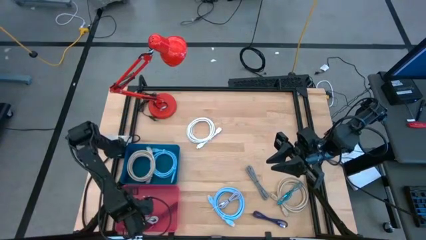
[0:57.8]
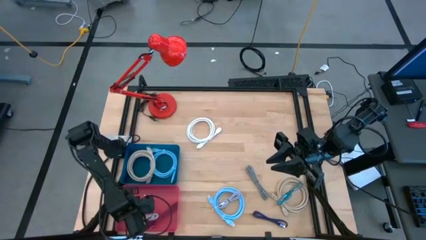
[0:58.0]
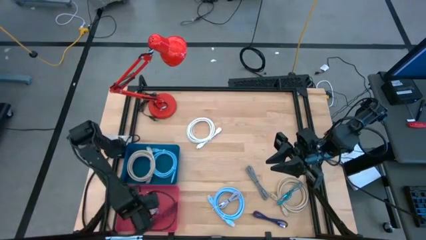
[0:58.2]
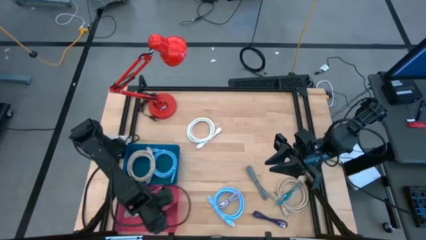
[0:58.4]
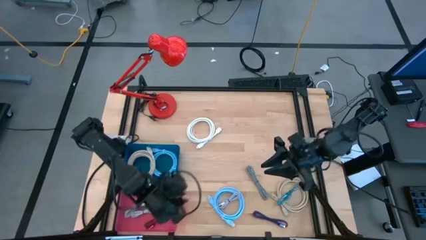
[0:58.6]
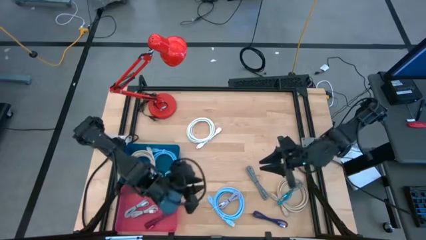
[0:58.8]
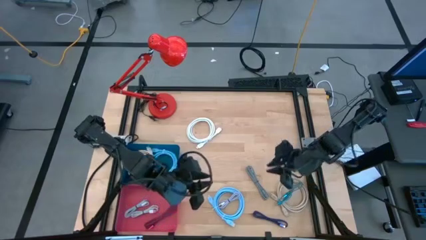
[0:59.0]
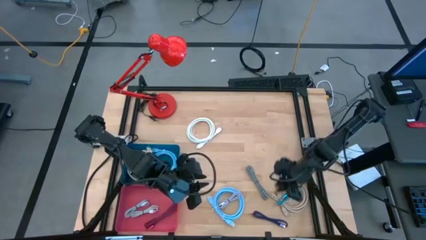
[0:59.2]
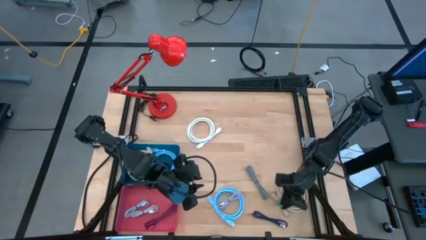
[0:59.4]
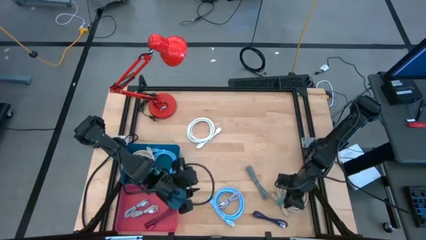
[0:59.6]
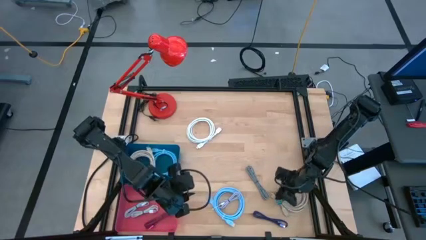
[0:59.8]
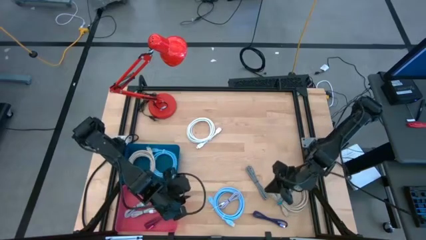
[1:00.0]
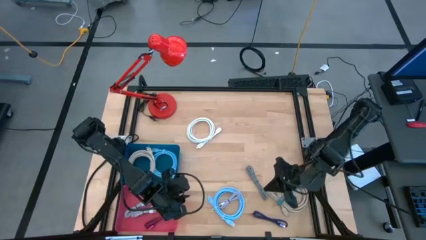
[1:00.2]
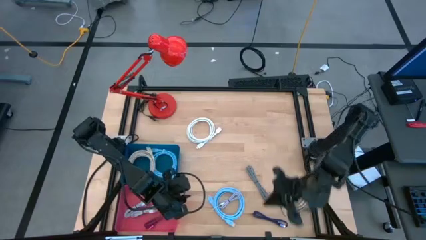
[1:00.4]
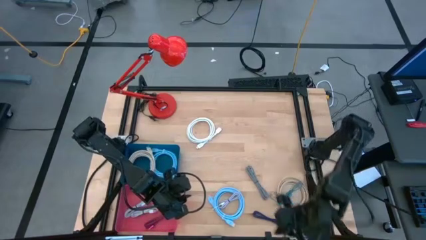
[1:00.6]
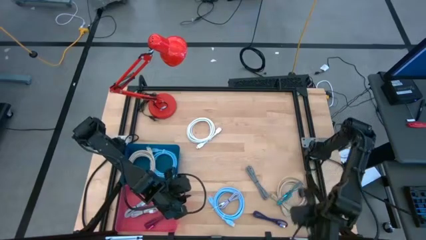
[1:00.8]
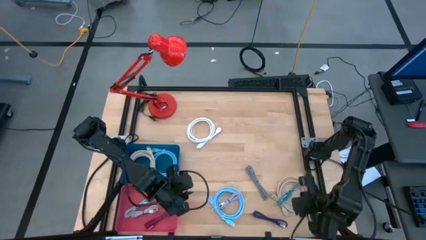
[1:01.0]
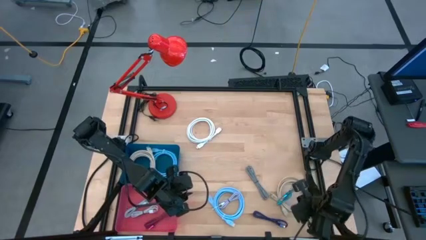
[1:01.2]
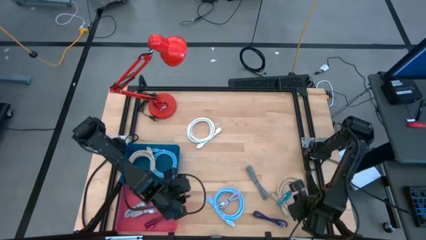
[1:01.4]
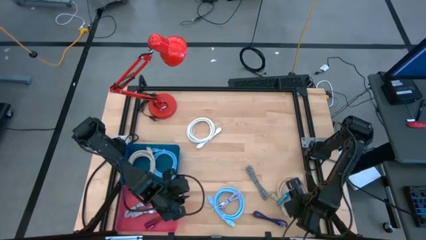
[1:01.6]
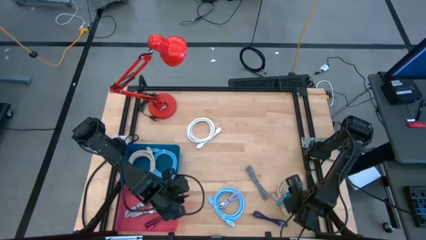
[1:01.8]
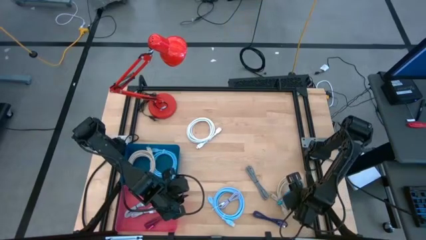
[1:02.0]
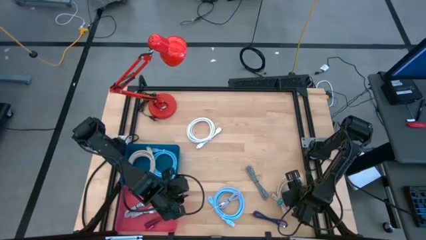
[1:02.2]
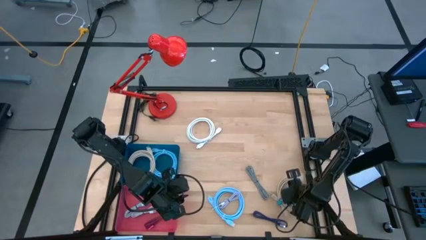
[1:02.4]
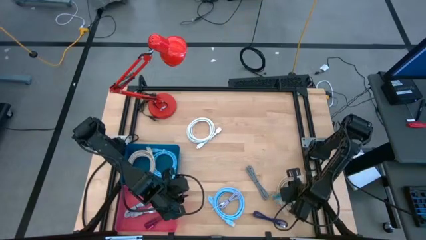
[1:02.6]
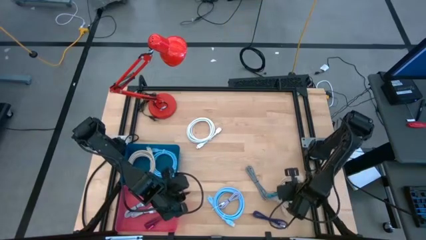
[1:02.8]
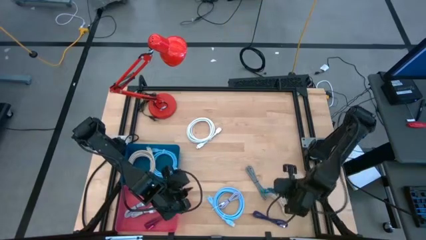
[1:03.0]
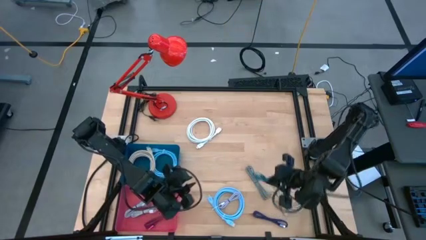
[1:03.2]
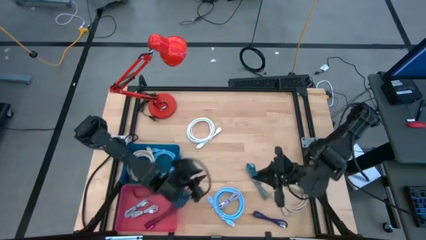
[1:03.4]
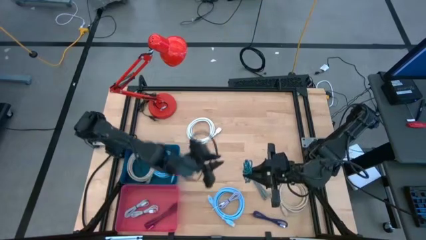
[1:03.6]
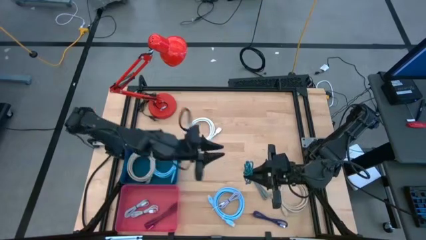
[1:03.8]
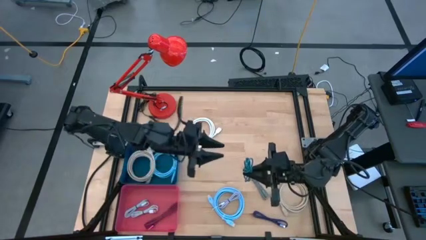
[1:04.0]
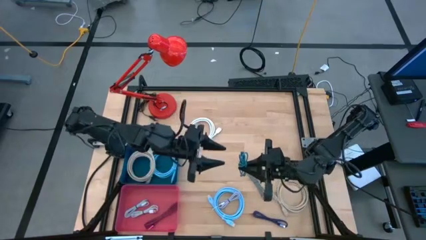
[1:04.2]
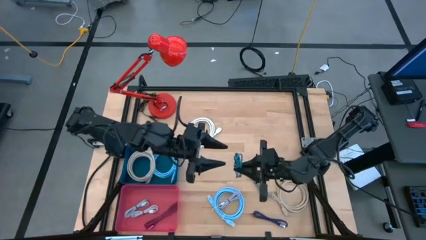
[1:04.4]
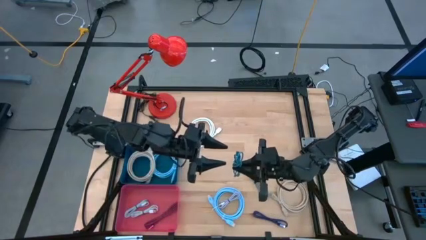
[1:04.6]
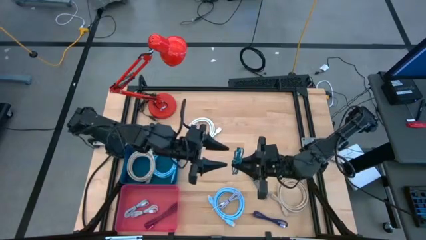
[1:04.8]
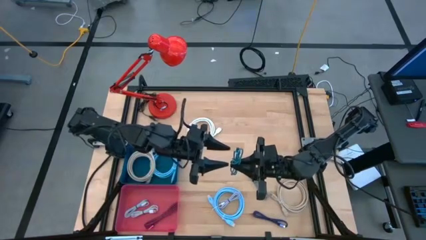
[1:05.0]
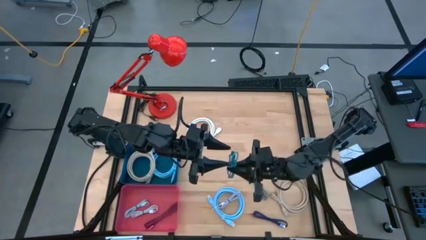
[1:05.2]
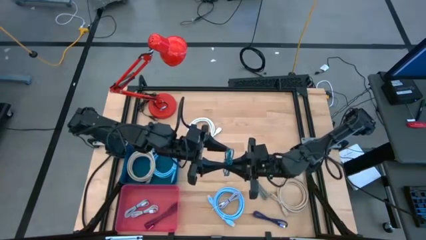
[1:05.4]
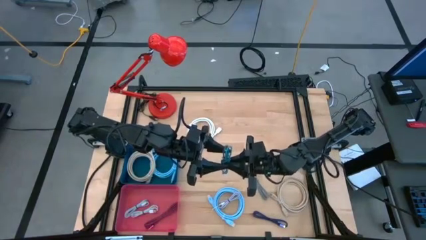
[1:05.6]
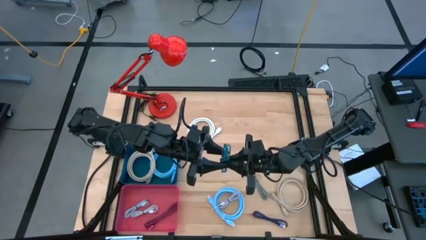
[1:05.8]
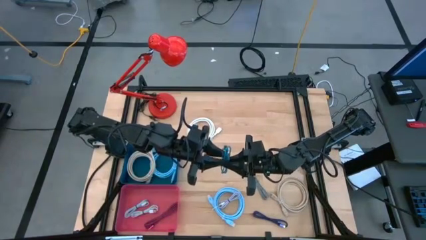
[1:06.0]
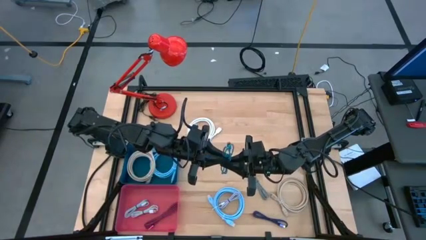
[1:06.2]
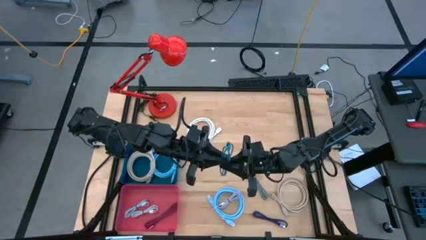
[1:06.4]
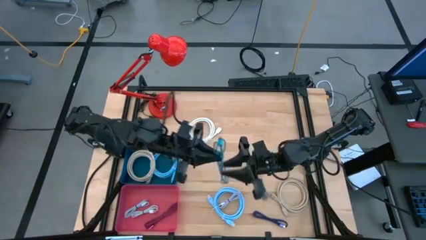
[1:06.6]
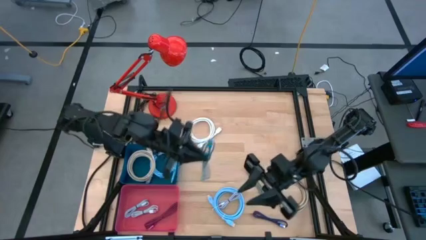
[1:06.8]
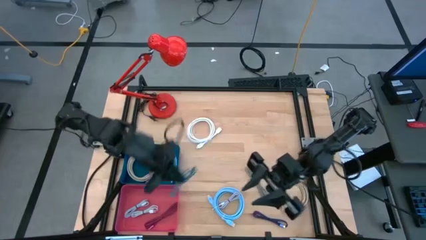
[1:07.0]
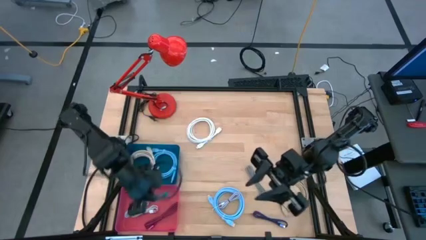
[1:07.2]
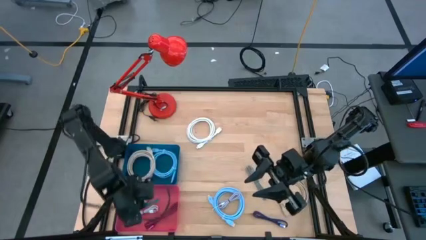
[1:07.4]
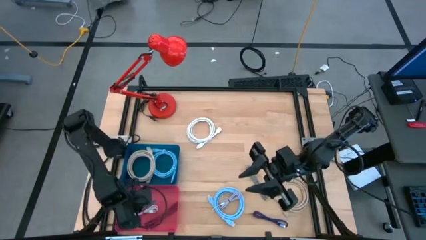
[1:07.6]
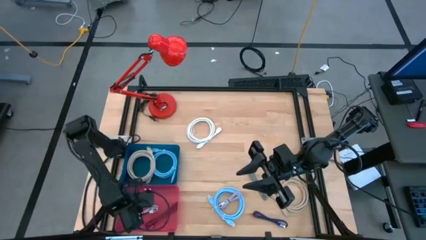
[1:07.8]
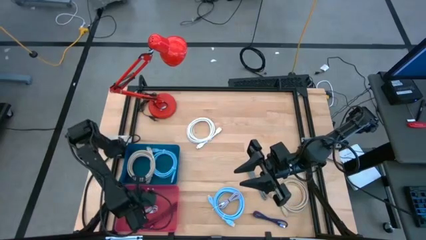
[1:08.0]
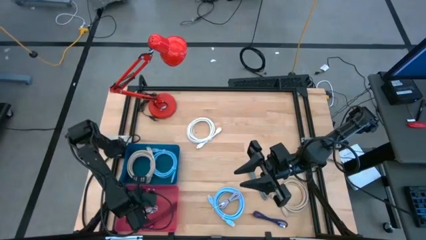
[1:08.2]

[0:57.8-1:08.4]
Task: Pick & Place USB Port
Put the blue and black USB cable into the red bin

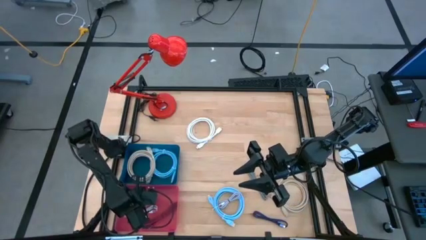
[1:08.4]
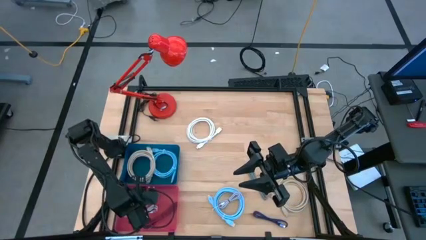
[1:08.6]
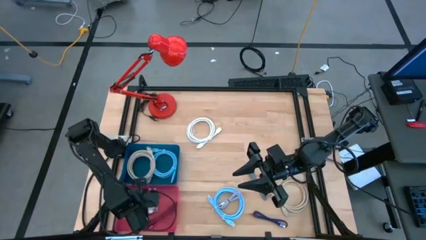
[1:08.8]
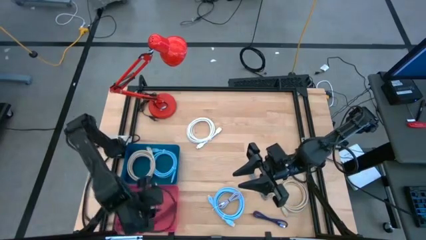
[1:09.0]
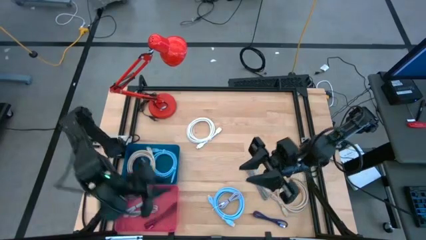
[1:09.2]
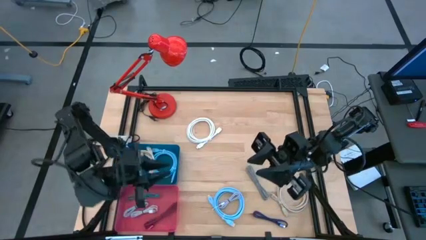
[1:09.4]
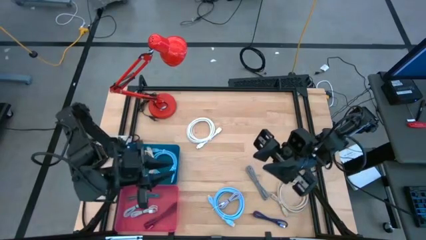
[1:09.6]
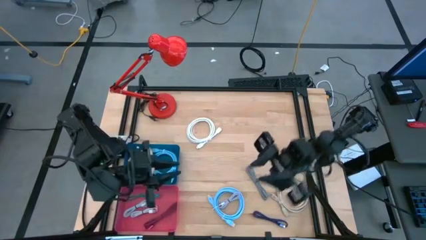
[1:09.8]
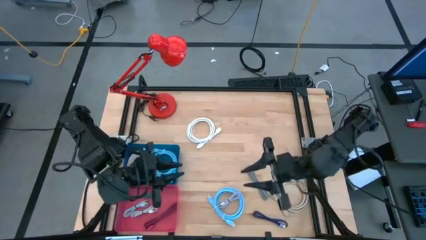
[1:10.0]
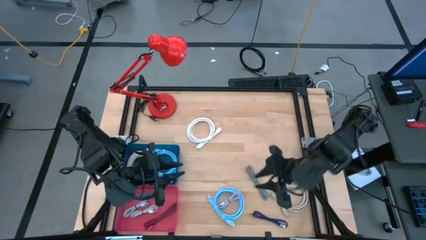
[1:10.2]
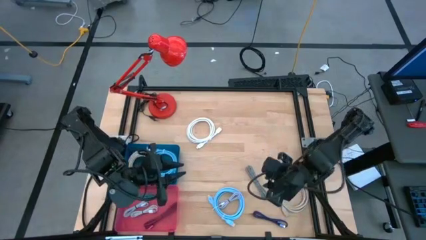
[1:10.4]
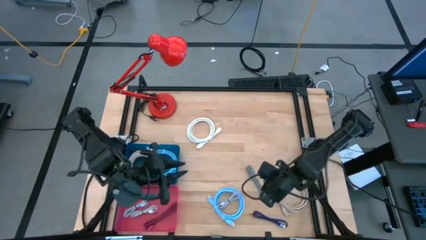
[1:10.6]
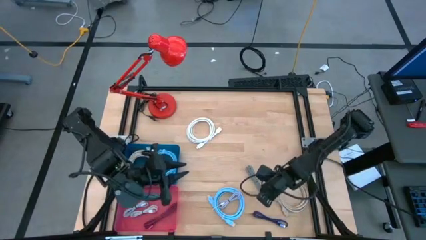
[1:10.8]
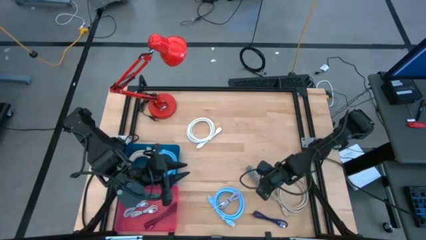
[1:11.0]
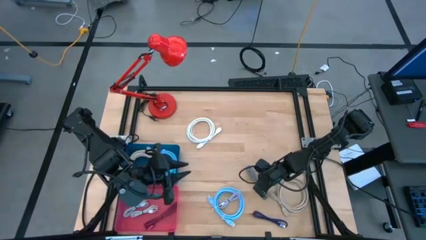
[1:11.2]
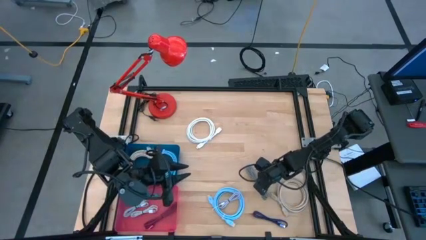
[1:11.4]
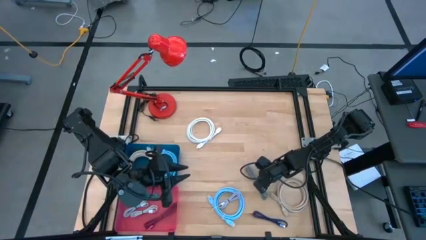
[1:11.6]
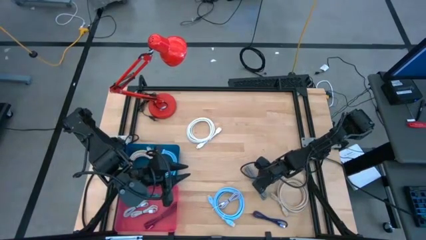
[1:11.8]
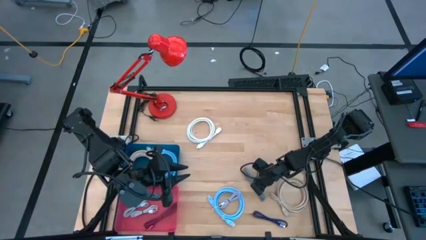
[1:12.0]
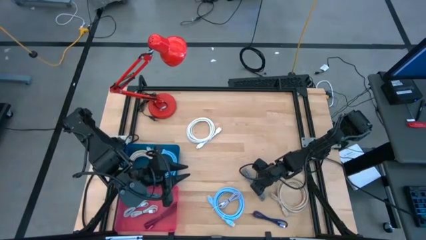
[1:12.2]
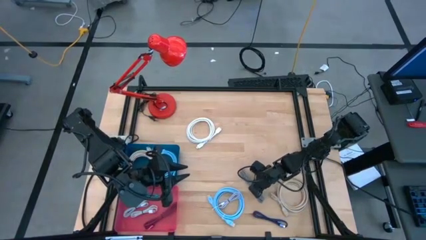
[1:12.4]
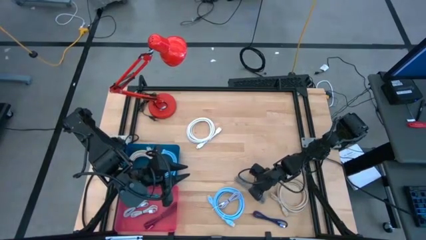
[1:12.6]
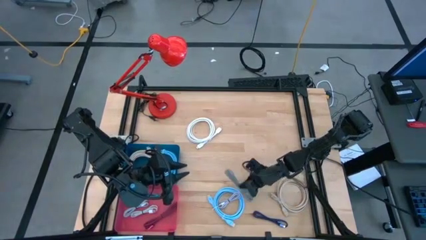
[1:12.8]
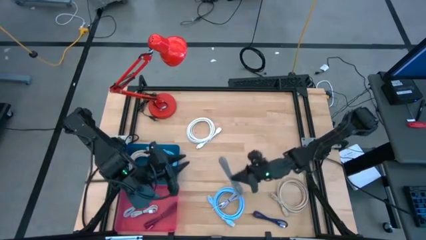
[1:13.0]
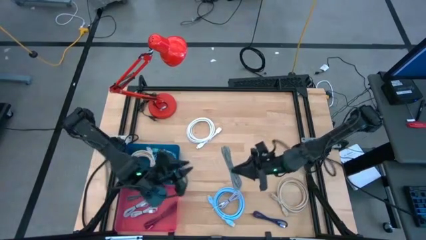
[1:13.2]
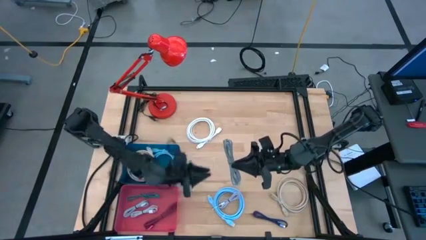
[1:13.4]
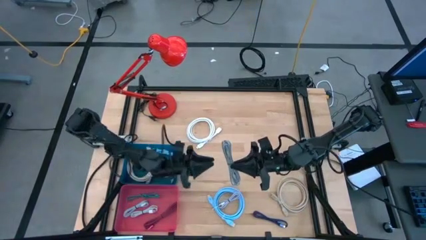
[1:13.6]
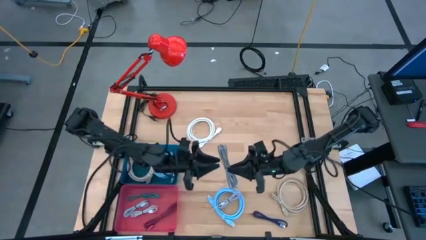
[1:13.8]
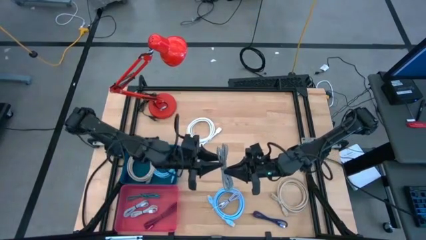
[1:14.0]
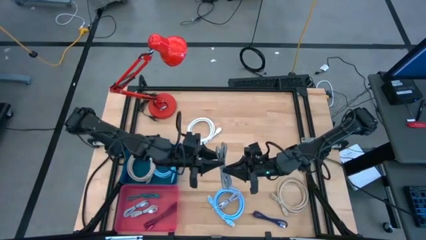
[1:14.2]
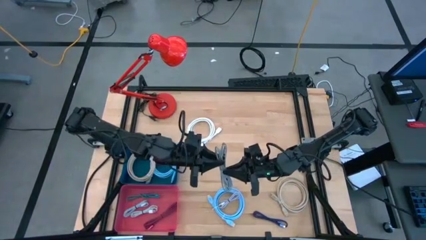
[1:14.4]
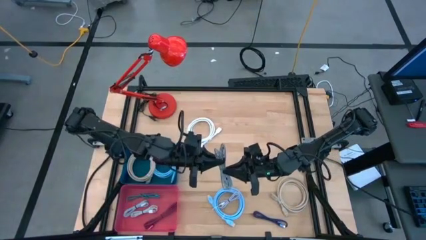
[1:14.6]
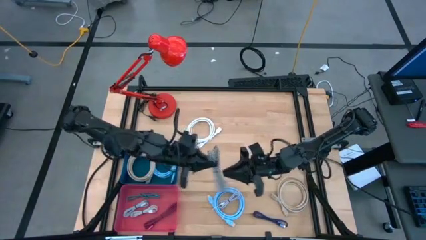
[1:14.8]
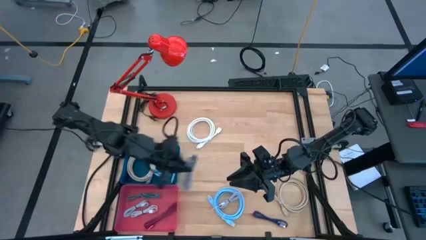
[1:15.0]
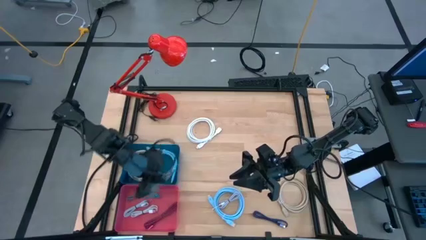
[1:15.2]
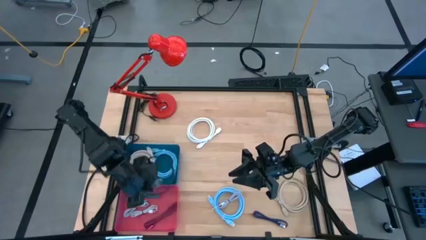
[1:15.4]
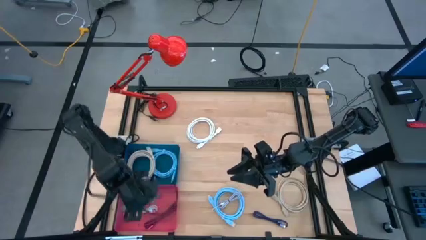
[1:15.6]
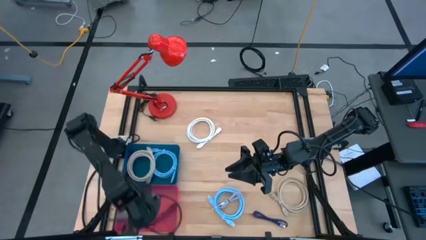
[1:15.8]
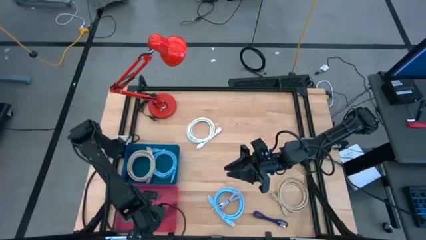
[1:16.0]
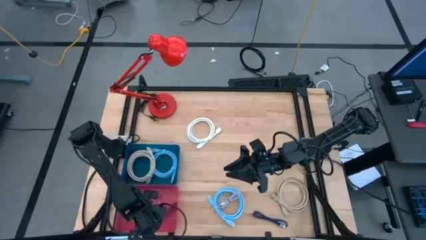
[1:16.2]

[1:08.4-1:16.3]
Put the white and black USB cable into the red bin
